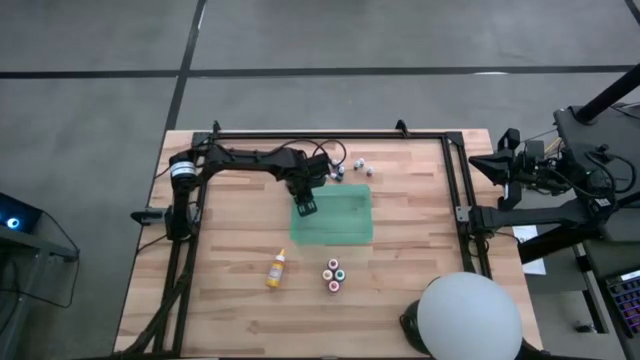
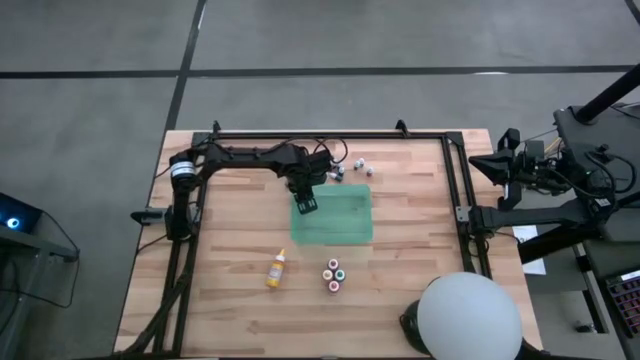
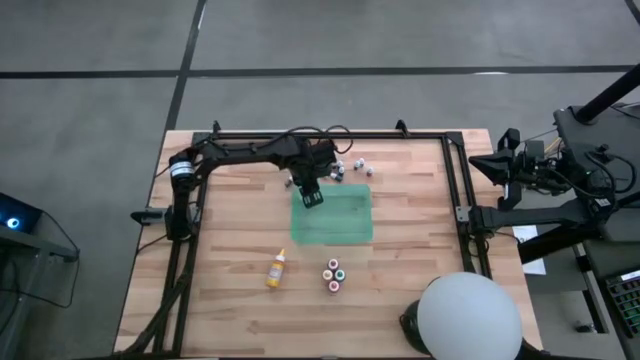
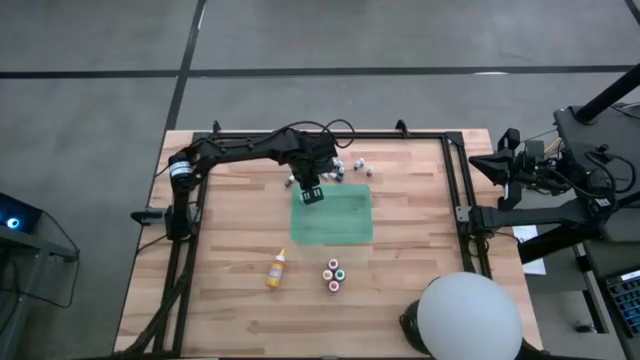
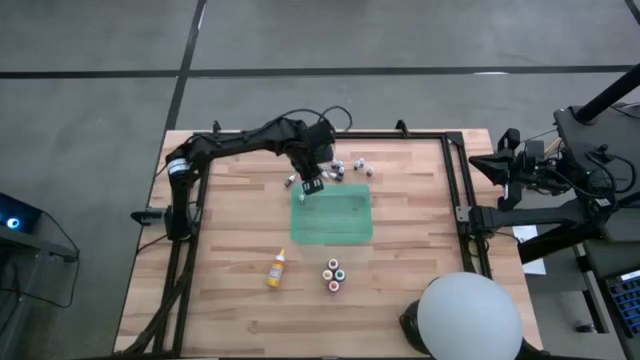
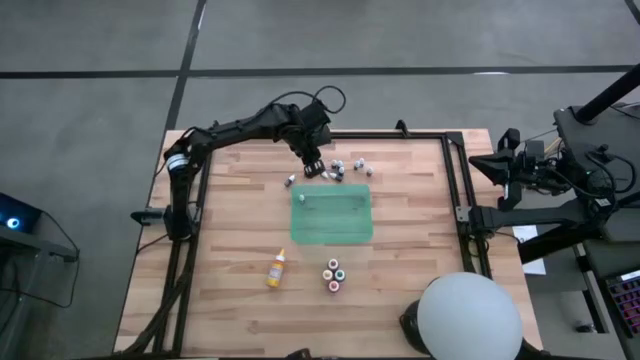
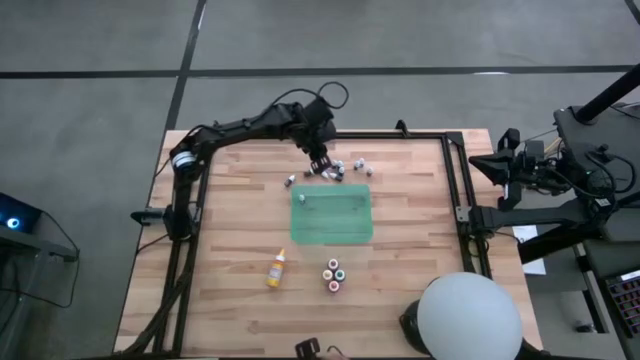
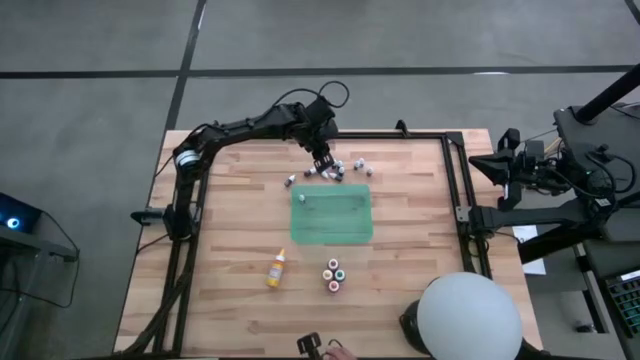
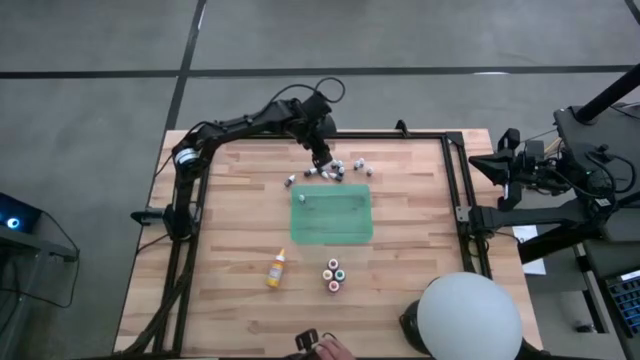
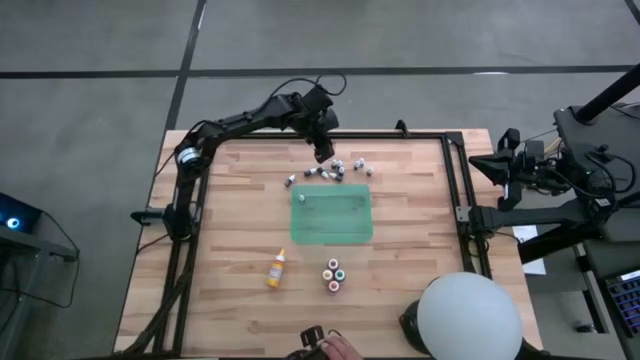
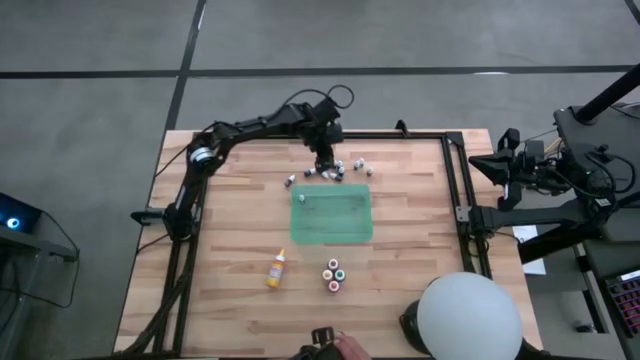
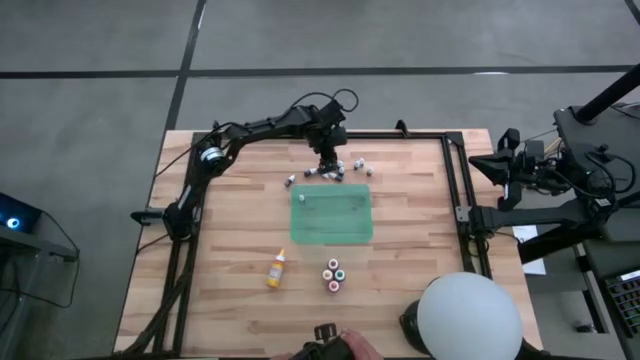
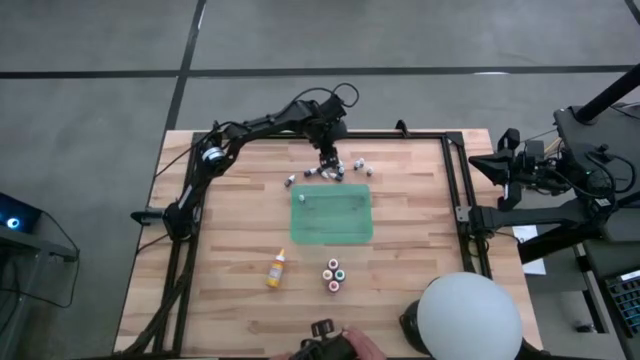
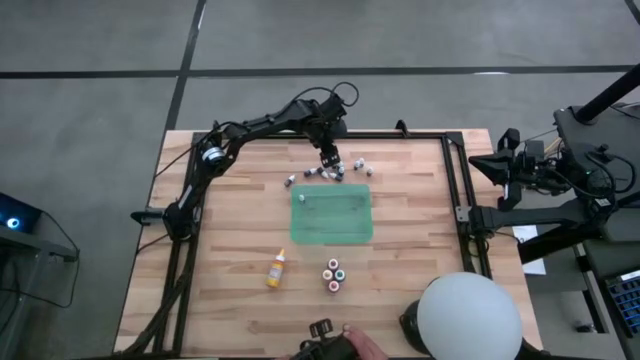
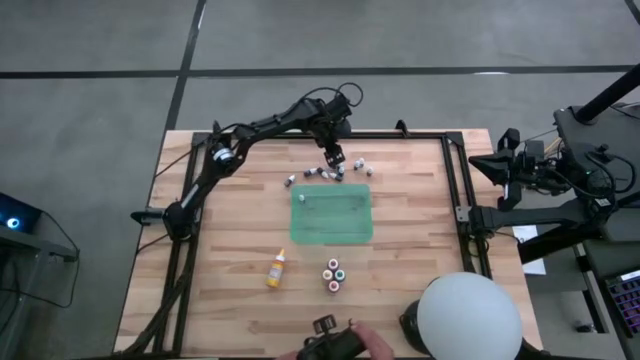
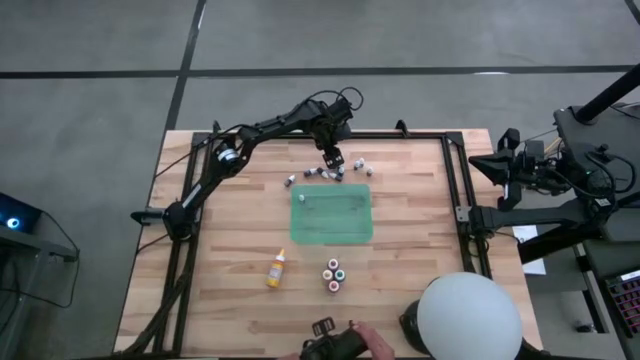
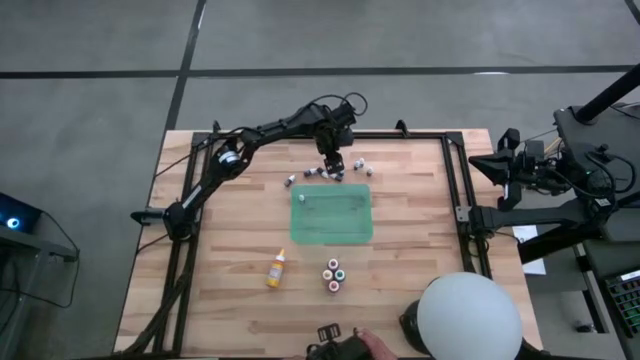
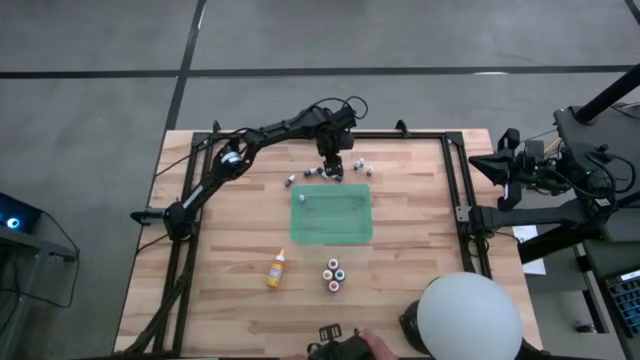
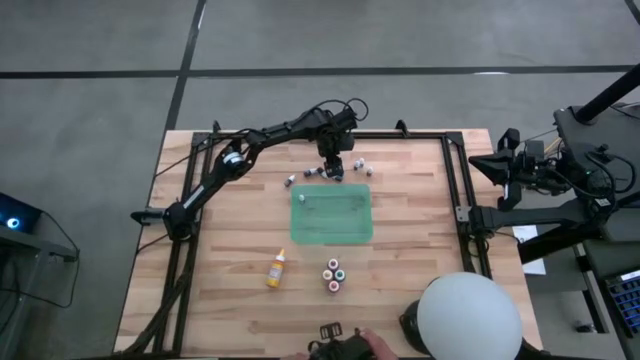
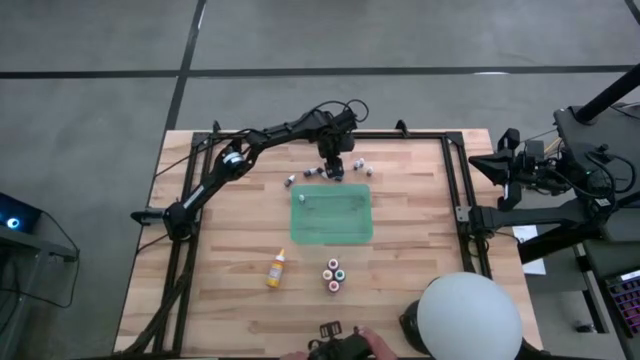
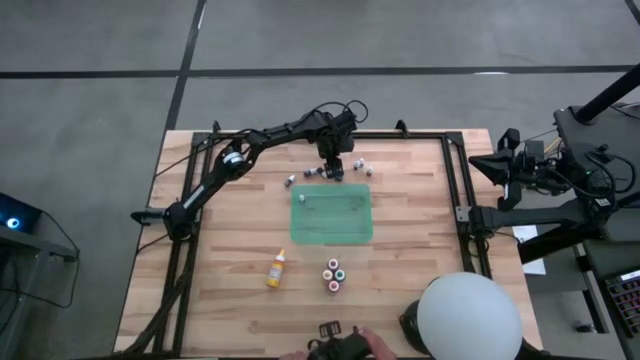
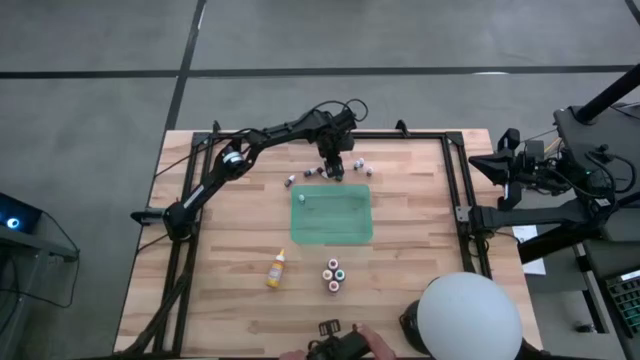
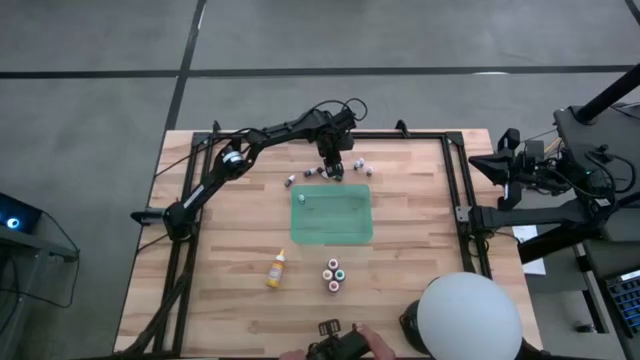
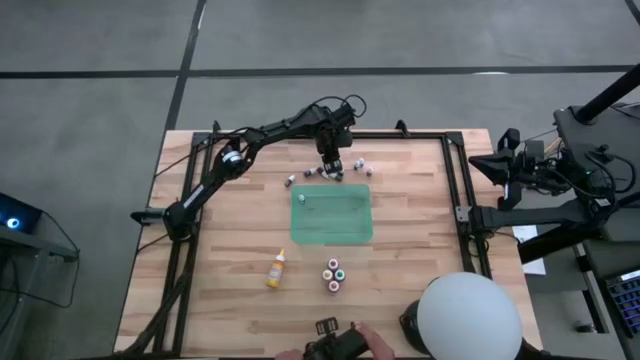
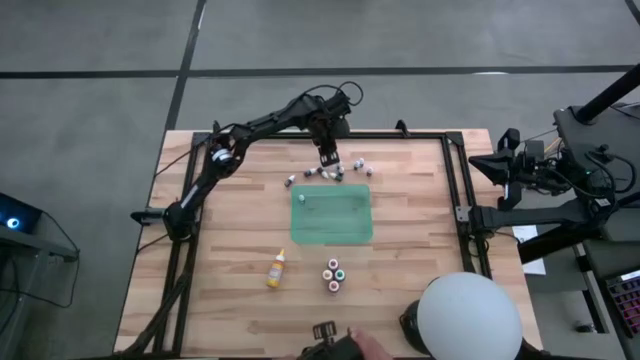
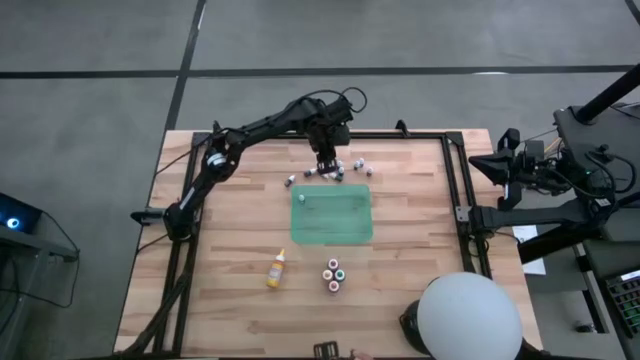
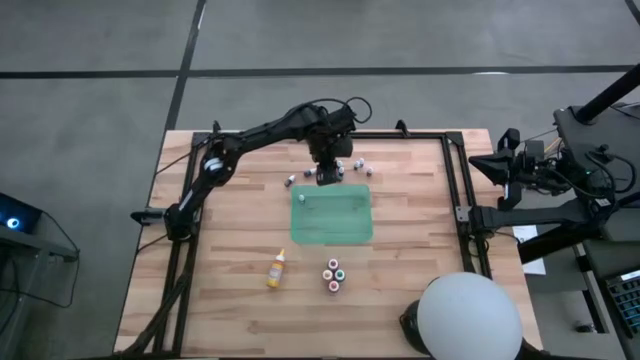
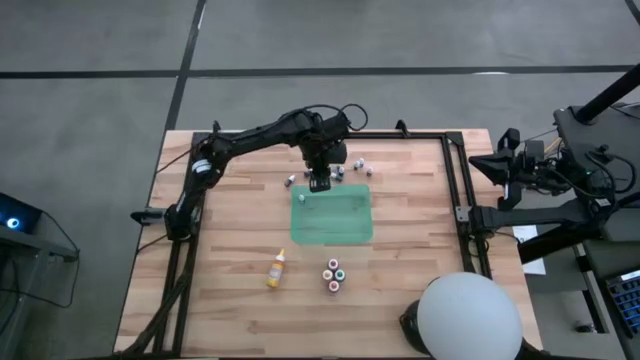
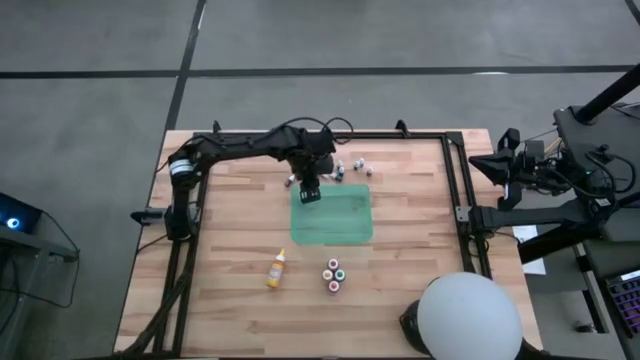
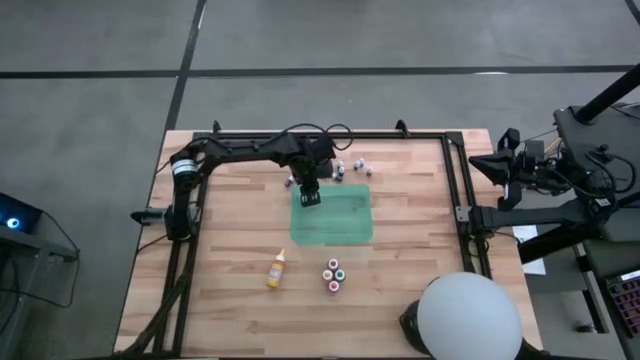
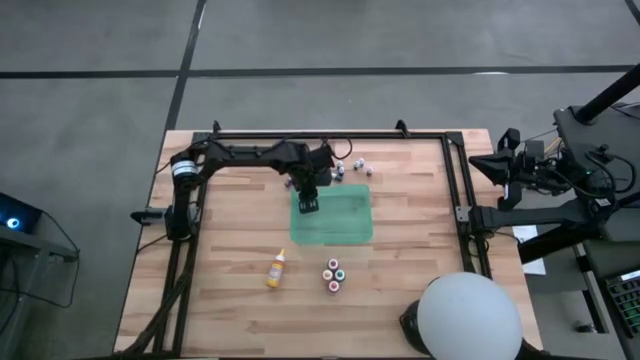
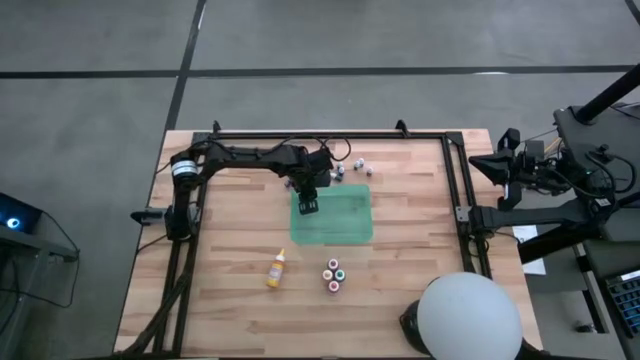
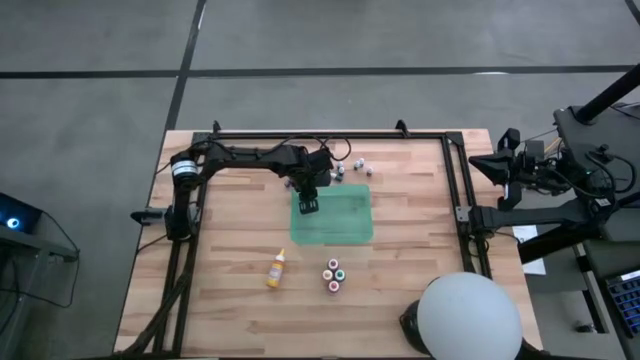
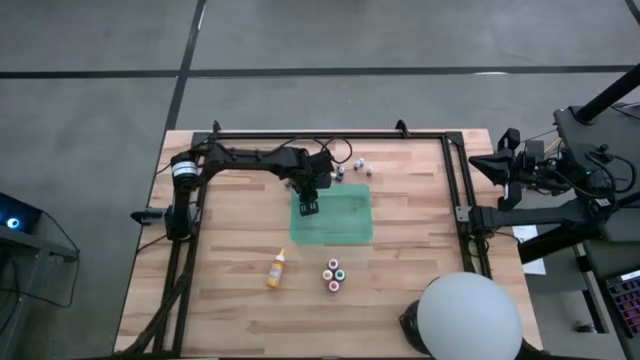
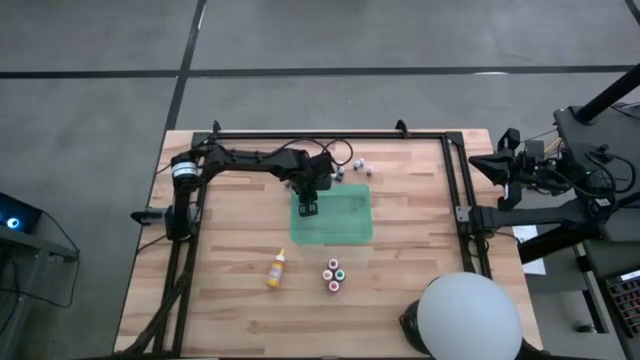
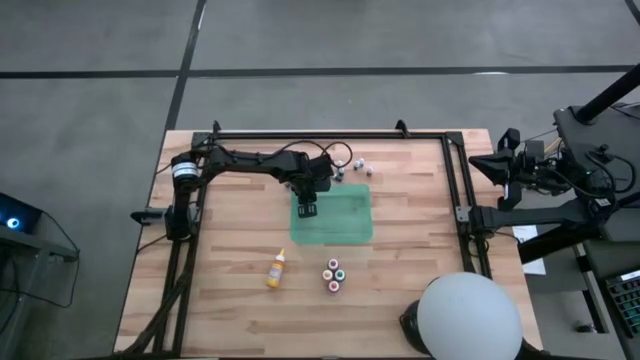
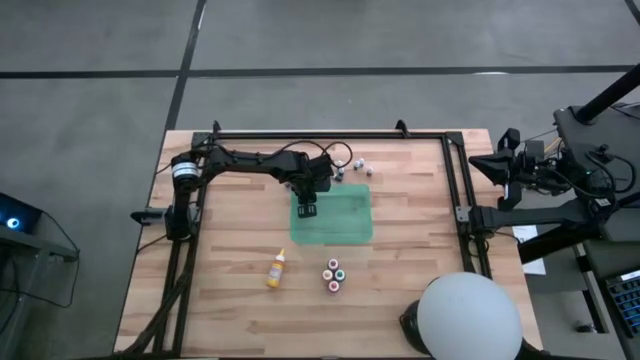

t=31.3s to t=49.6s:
Task: Pick & Place food coloring
Put the green food coloring bottle into the green container

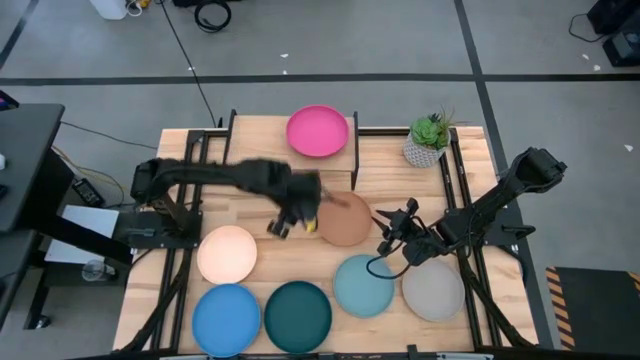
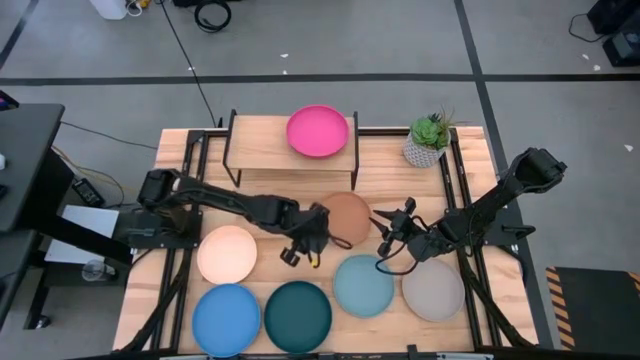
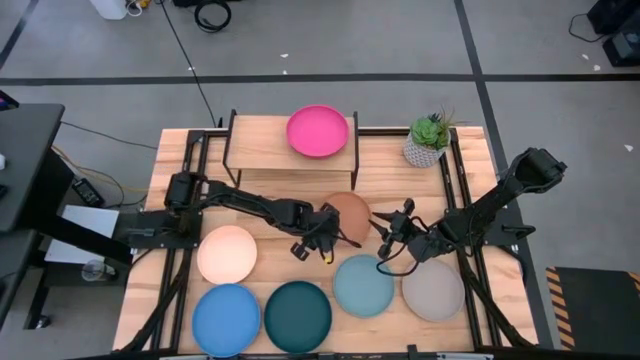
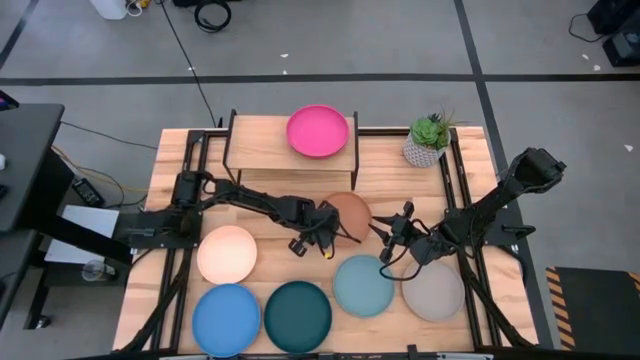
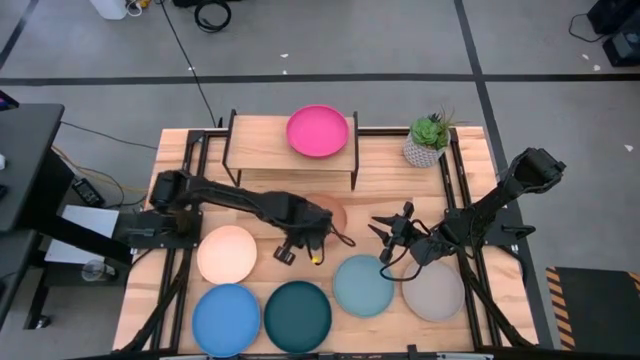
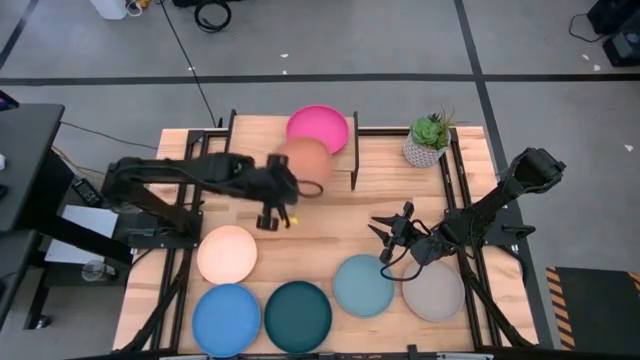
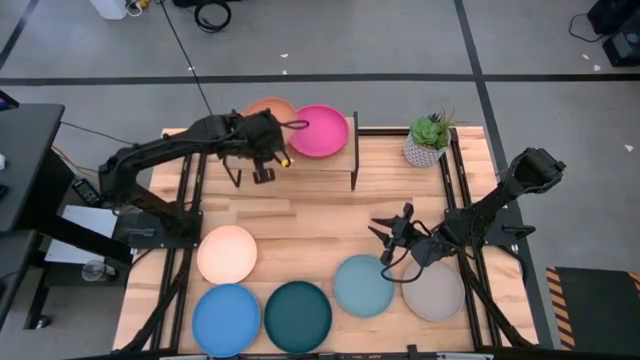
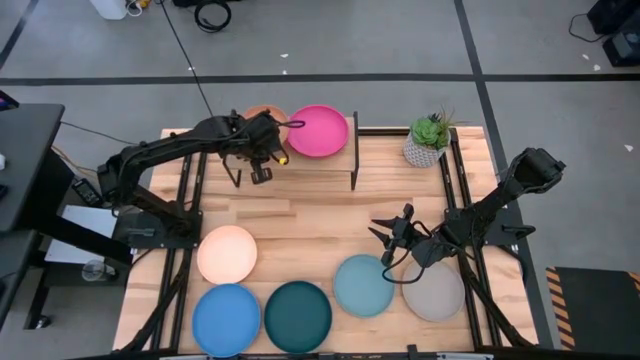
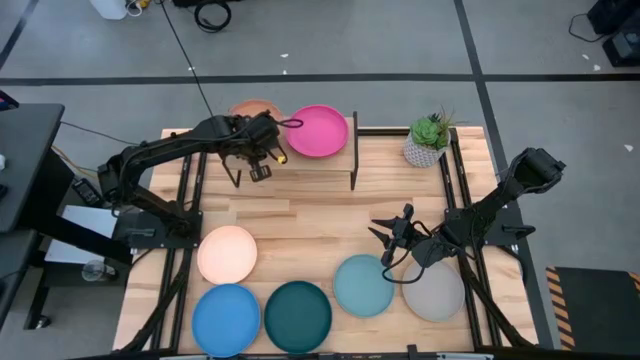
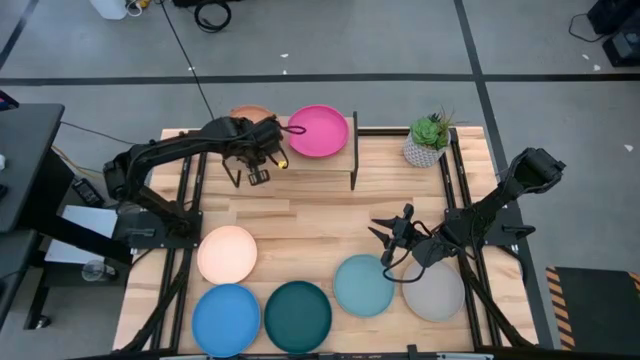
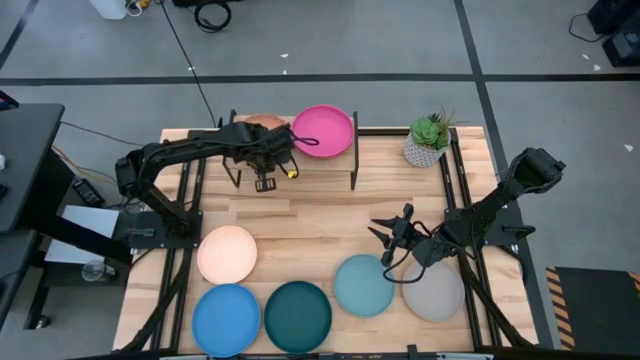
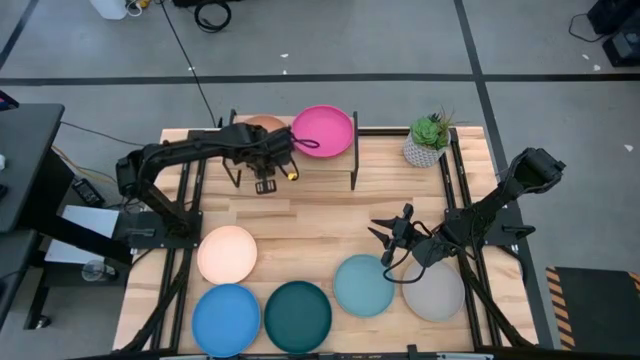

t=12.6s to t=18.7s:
Task: Place and stack plates onto a shelf
Put the brown plate on the shelf
